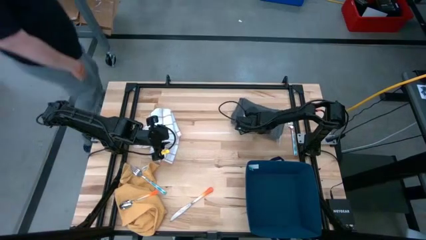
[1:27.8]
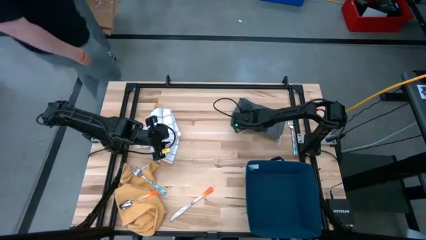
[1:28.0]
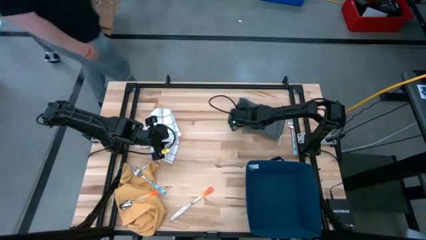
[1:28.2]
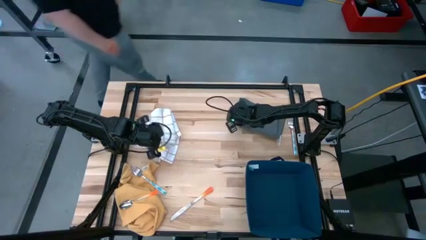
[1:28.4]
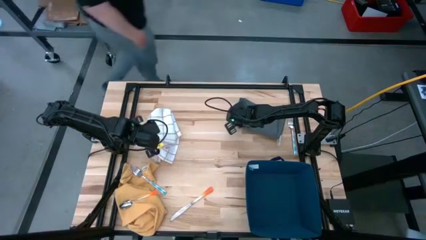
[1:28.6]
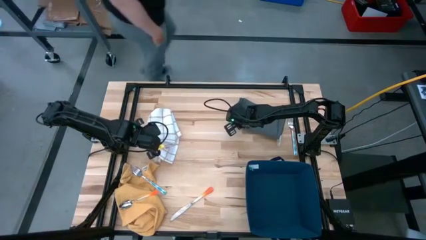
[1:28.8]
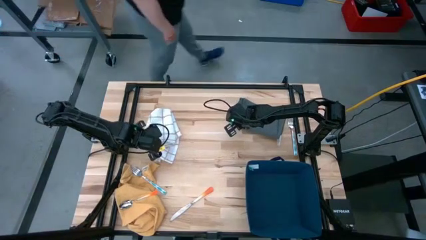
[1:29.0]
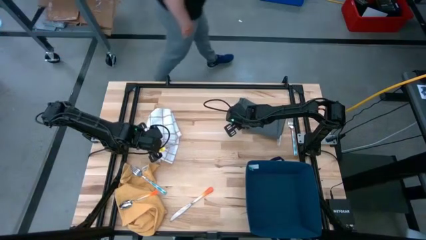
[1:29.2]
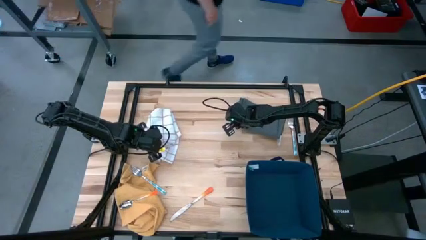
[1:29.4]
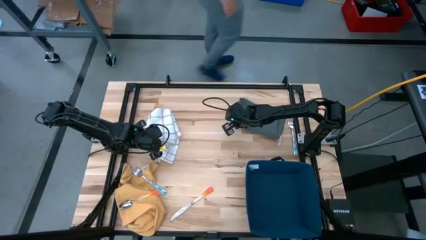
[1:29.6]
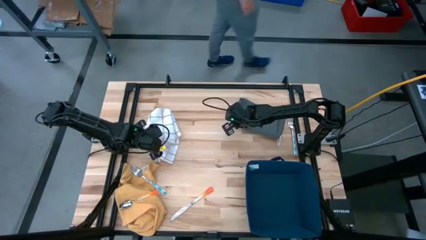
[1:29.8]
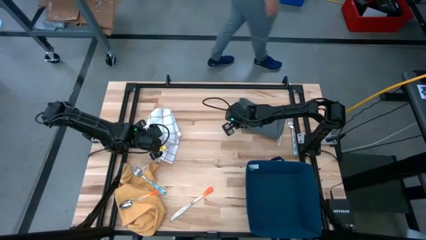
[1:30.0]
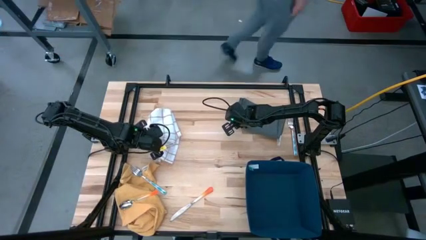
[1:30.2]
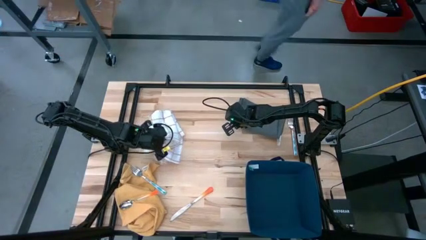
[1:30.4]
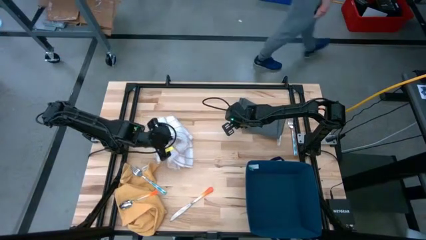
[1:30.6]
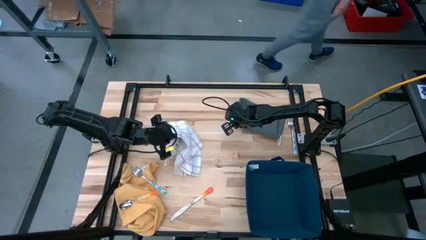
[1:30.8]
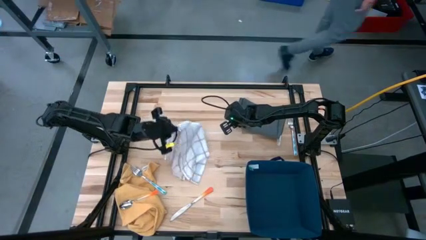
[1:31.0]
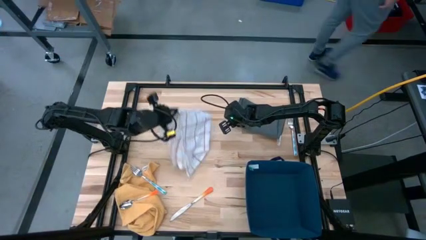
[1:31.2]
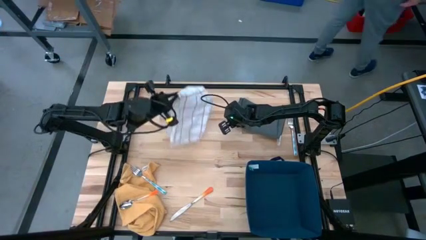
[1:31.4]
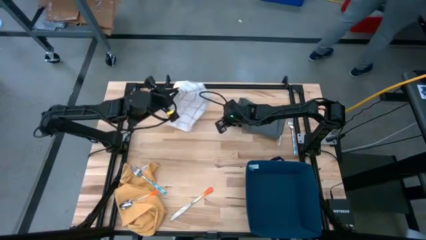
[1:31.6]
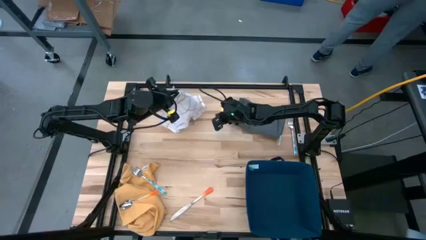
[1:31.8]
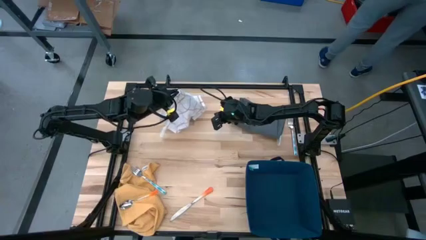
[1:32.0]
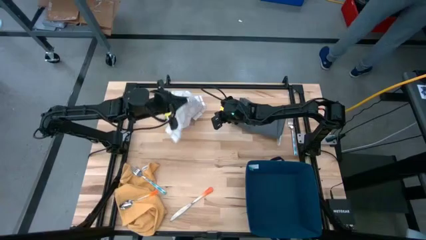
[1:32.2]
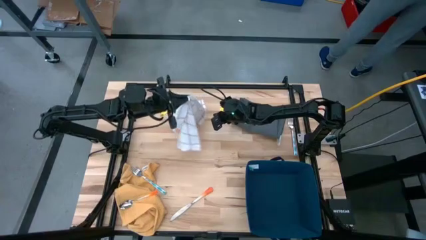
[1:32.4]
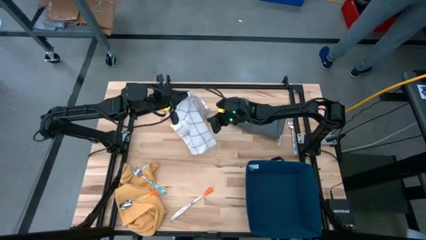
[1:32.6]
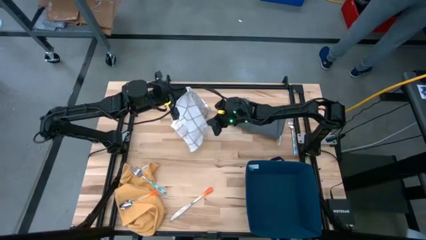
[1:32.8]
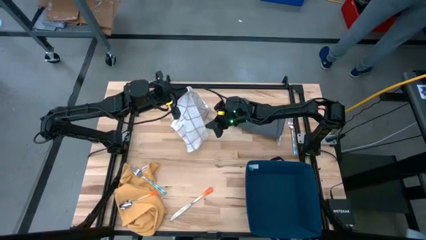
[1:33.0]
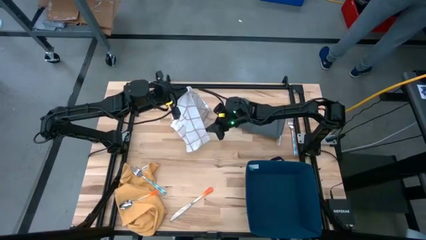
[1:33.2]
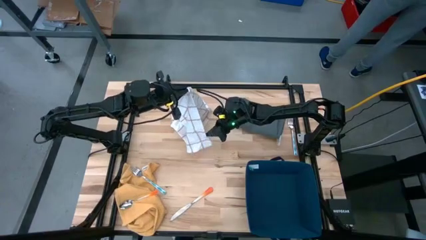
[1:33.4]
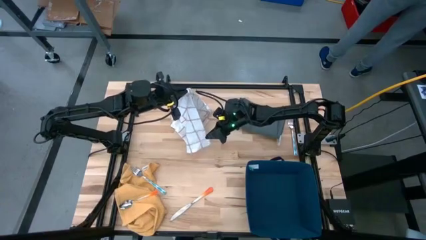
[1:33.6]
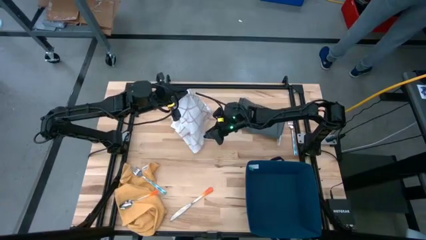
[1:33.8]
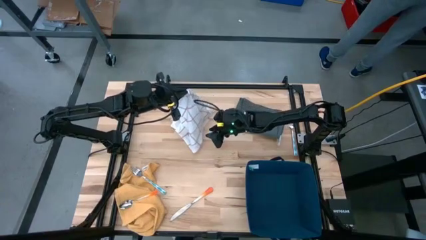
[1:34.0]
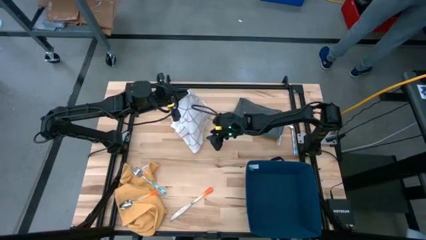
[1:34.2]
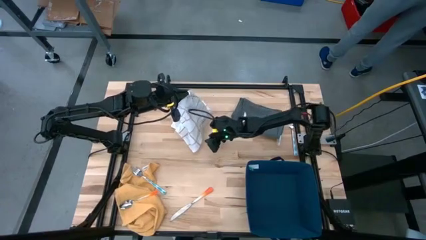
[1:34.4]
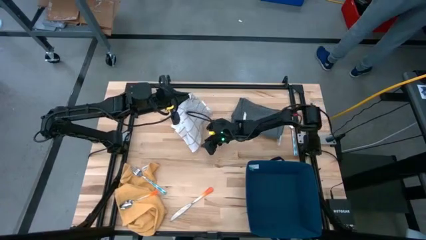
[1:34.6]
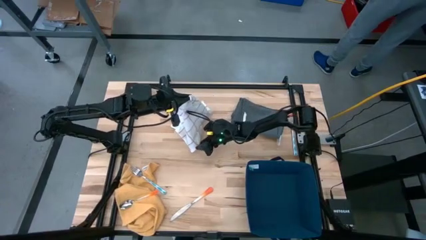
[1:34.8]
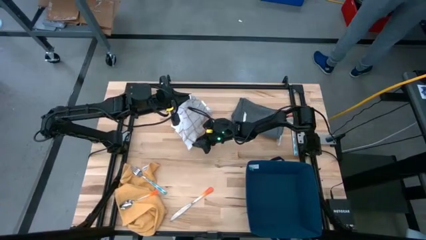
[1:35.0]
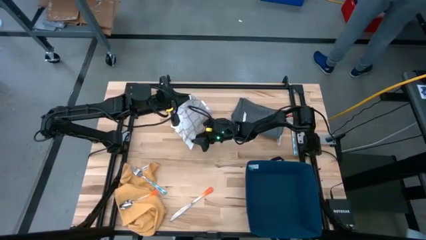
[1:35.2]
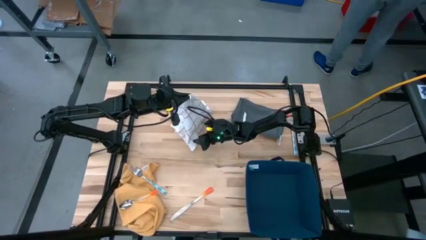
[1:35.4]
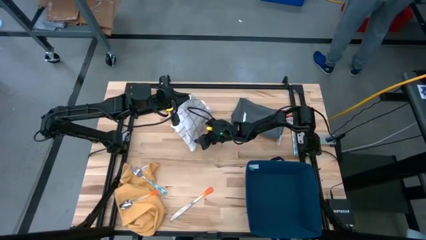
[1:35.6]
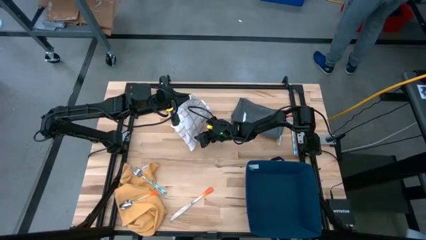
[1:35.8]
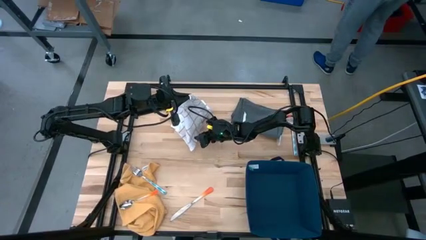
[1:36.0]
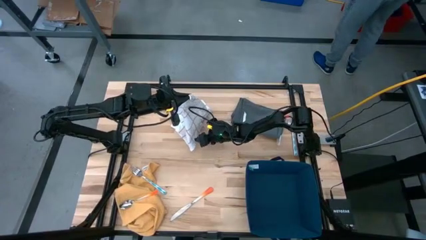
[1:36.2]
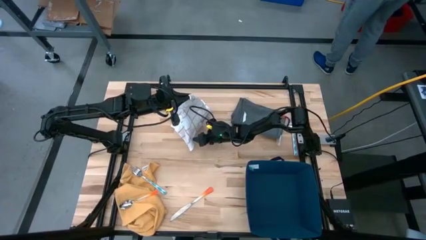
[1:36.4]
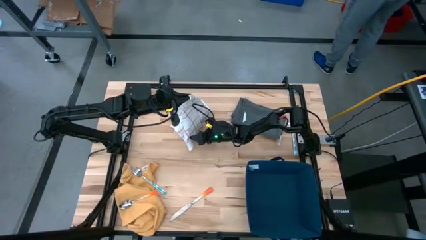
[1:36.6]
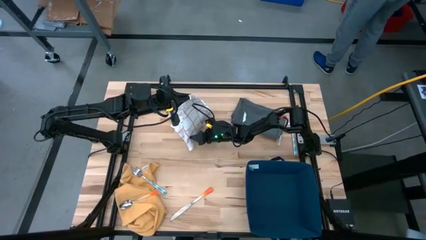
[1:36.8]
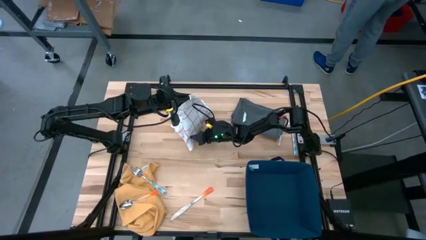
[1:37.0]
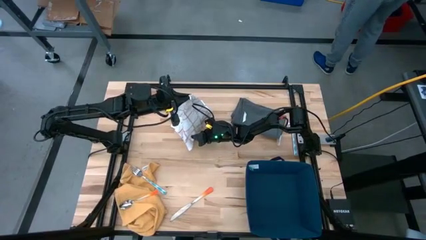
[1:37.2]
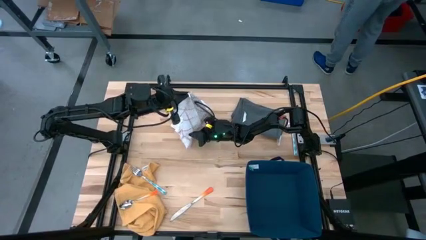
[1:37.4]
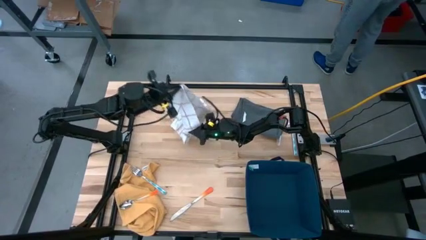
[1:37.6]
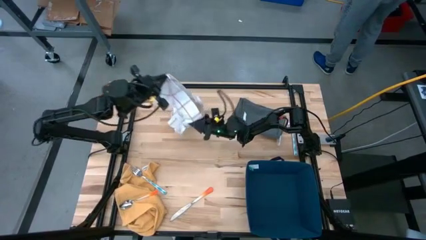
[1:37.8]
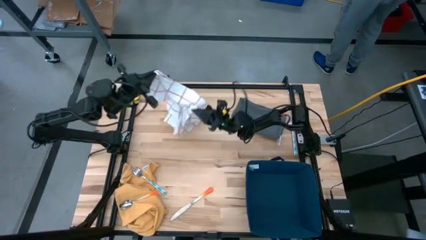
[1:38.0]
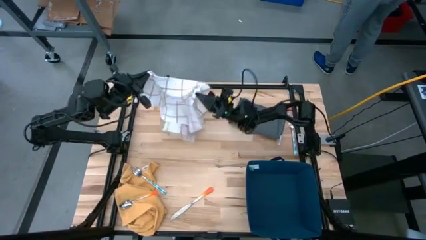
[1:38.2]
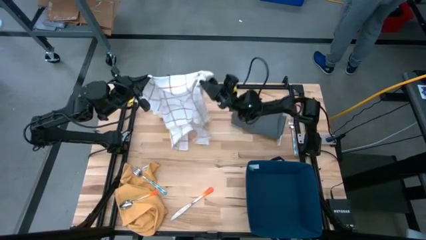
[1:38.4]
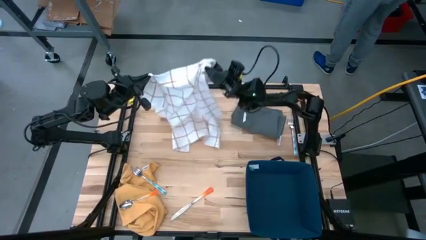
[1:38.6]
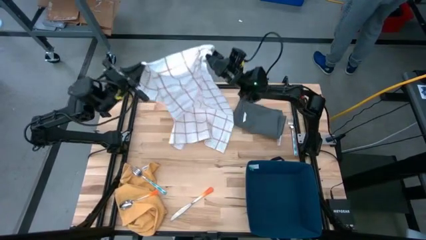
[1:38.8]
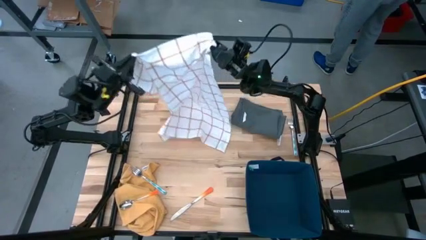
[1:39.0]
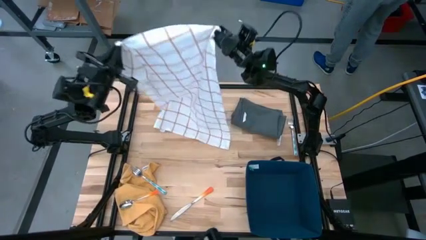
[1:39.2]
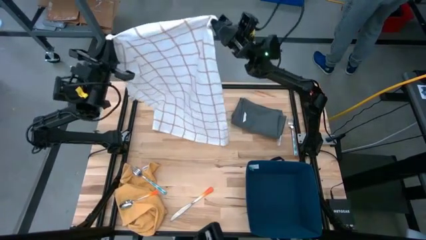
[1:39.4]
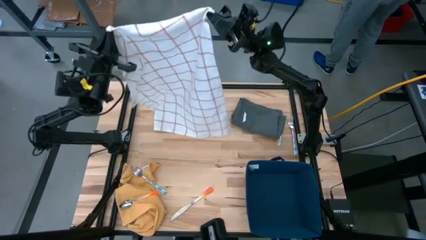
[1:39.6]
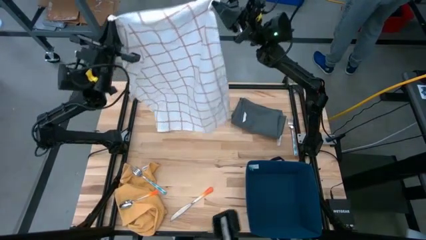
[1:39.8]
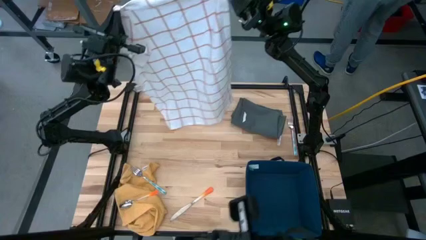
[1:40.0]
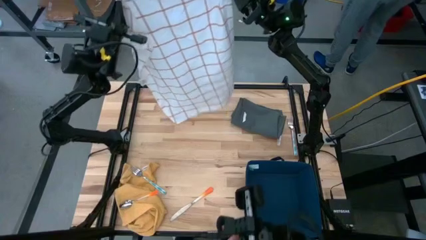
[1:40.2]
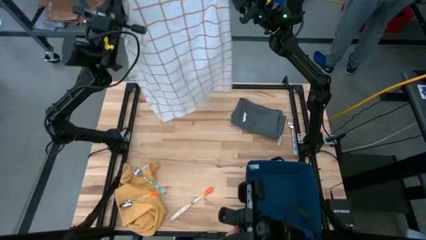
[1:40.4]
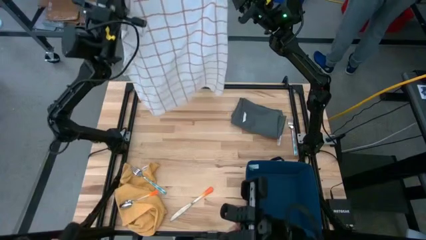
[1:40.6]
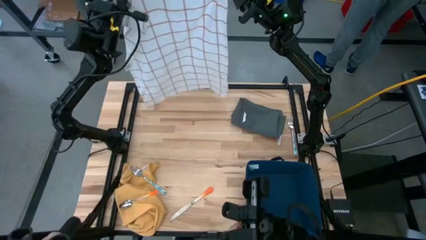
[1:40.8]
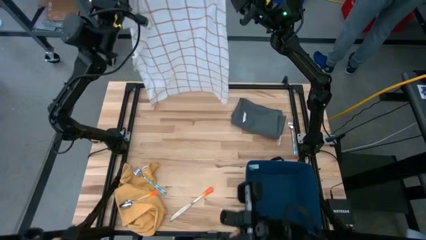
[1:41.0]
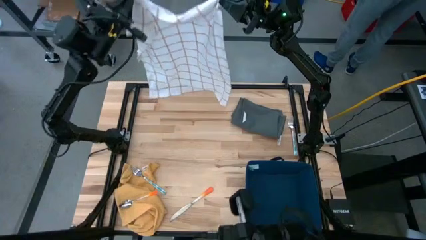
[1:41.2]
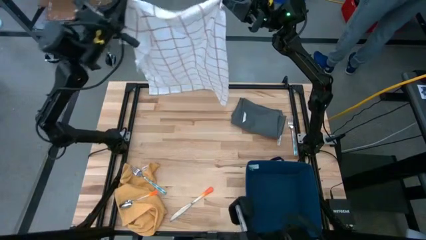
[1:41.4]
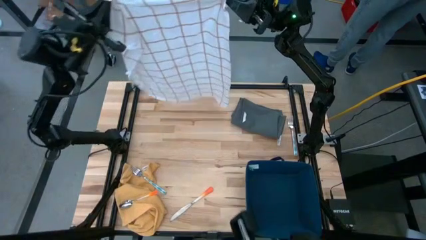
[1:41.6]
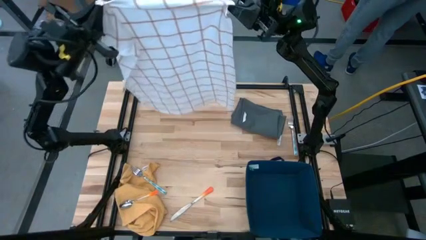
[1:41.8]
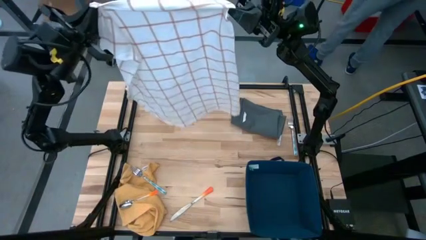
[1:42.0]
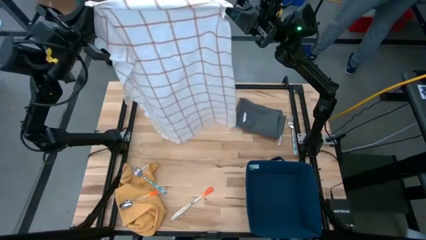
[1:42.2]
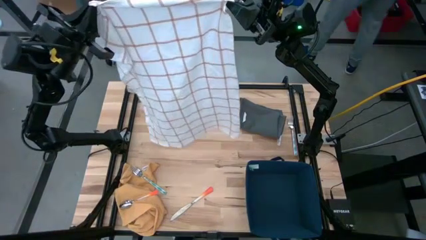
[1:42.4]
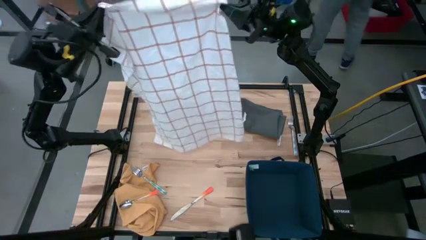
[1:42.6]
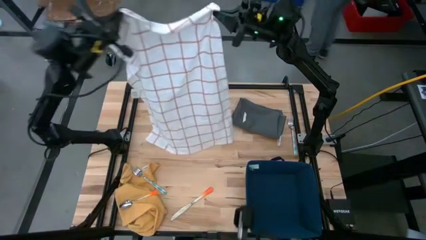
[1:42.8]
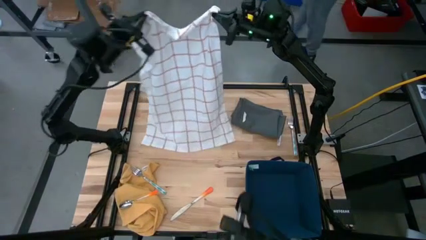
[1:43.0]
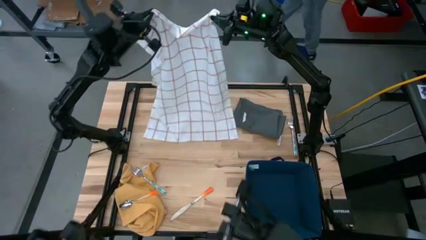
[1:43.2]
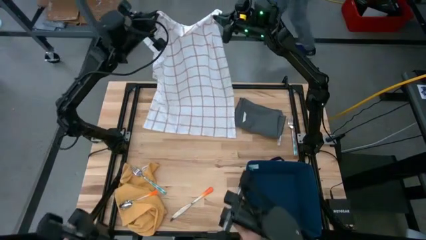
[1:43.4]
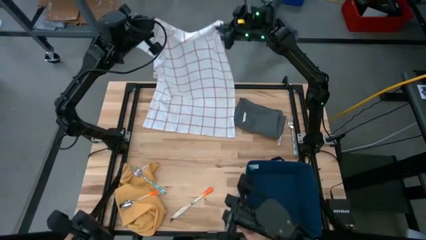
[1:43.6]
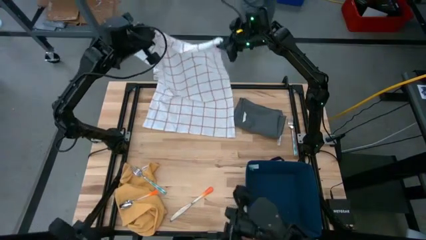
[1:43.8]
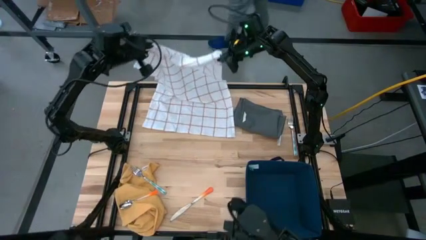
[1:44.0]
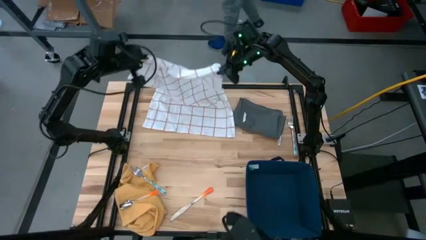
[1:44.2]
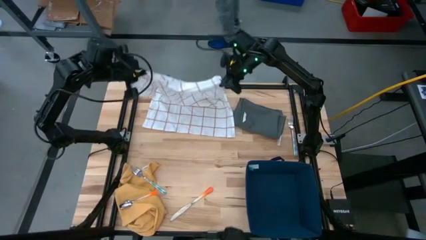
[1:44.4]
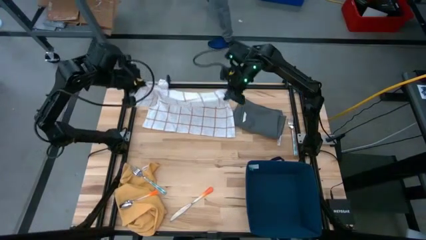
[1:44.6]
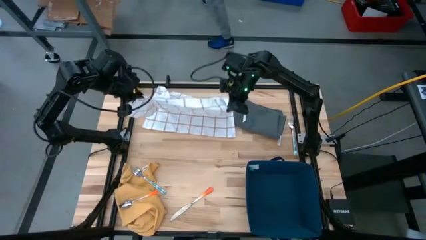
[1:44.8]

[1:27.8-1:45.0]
Task: Fold towel
Fold the white towel
